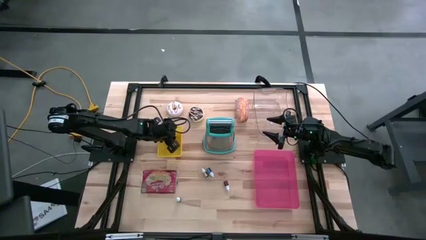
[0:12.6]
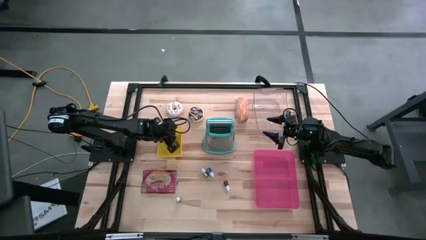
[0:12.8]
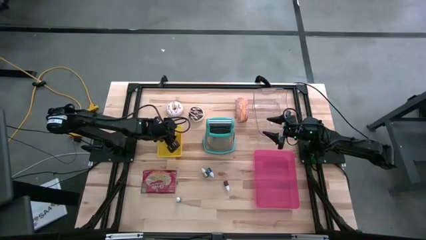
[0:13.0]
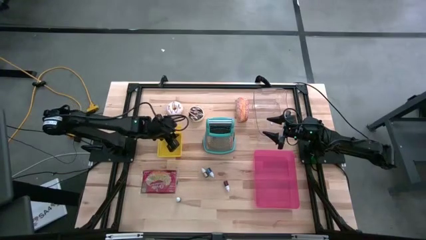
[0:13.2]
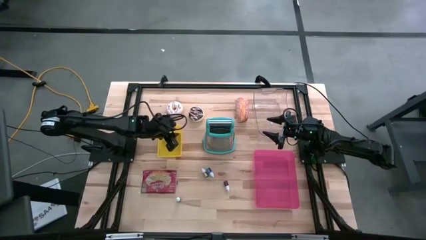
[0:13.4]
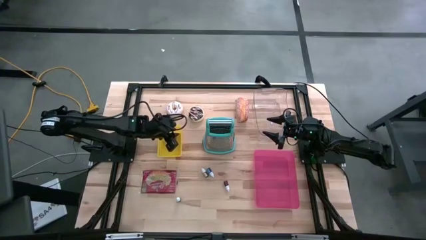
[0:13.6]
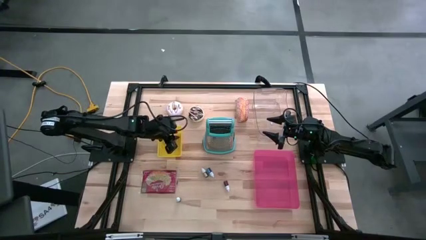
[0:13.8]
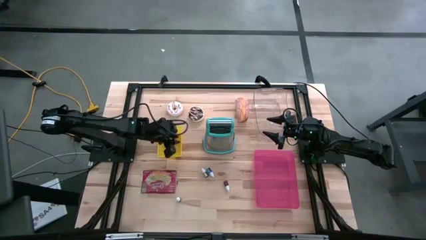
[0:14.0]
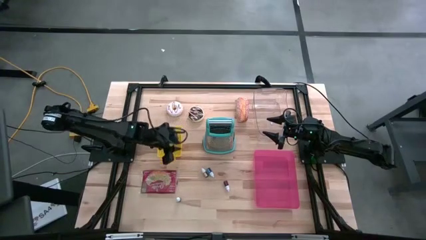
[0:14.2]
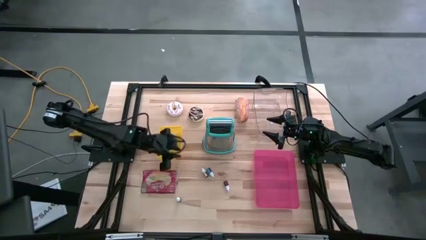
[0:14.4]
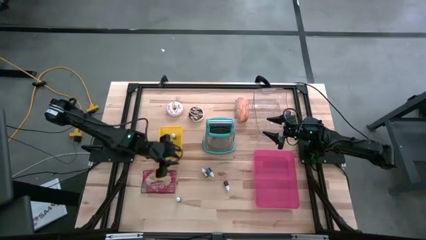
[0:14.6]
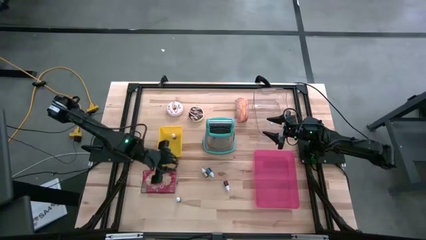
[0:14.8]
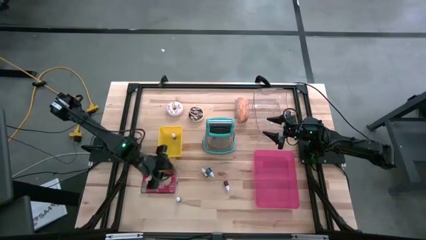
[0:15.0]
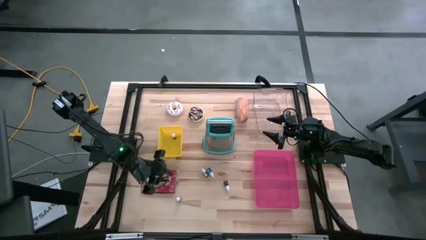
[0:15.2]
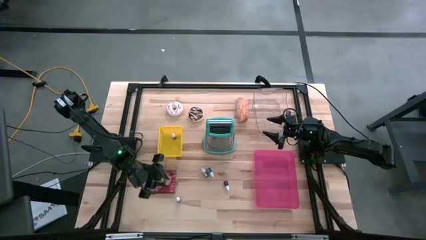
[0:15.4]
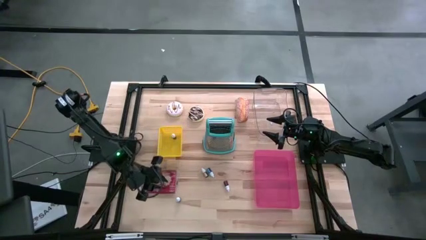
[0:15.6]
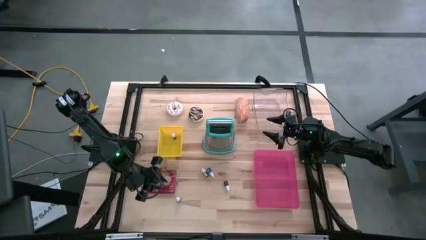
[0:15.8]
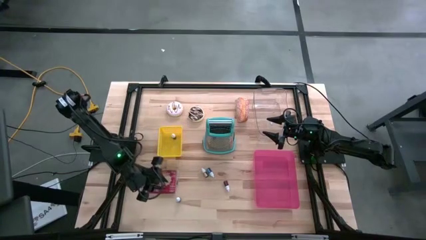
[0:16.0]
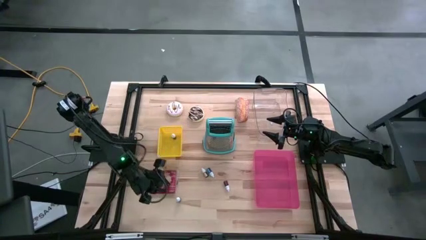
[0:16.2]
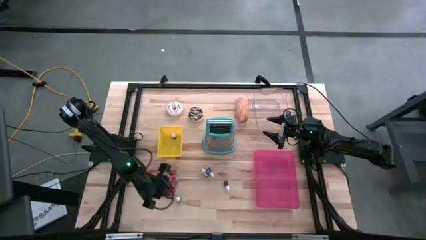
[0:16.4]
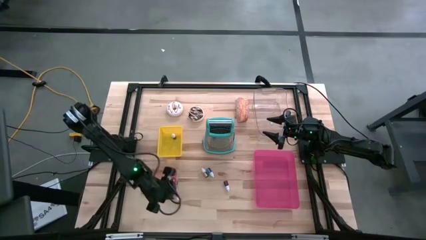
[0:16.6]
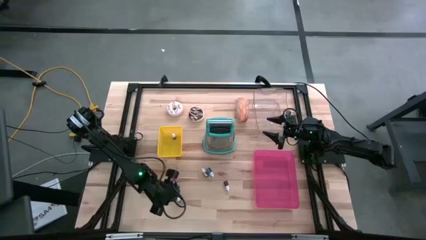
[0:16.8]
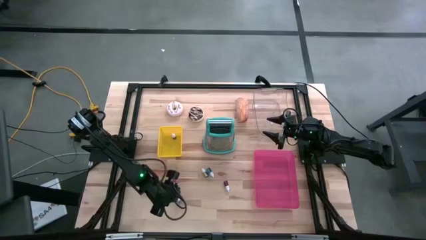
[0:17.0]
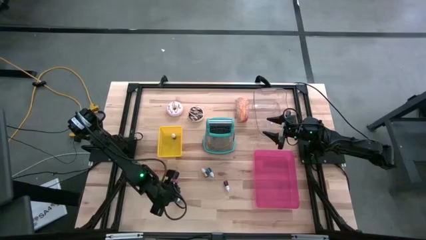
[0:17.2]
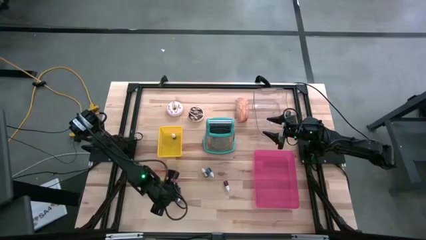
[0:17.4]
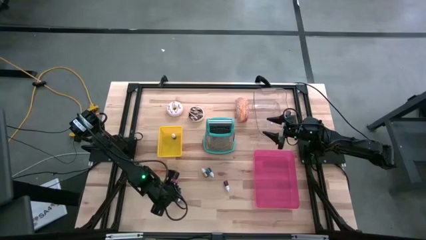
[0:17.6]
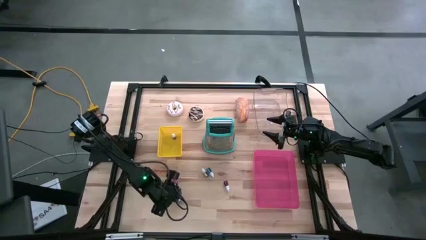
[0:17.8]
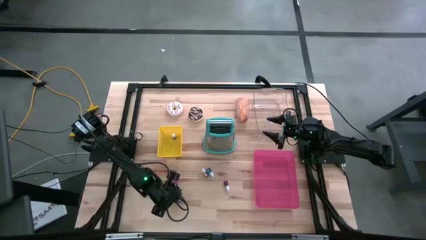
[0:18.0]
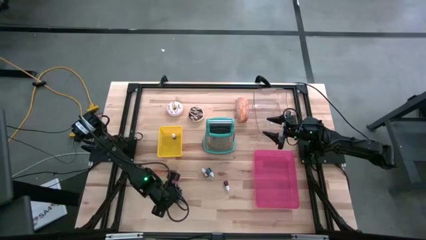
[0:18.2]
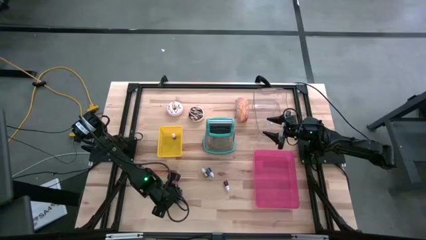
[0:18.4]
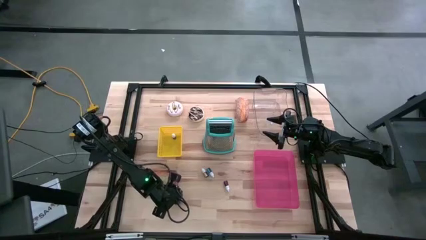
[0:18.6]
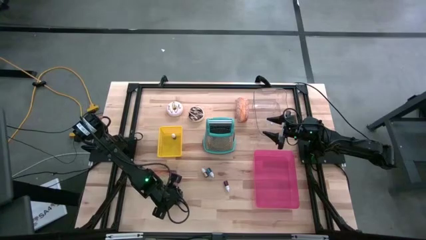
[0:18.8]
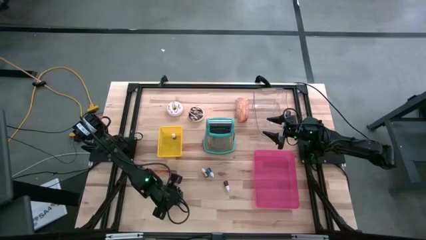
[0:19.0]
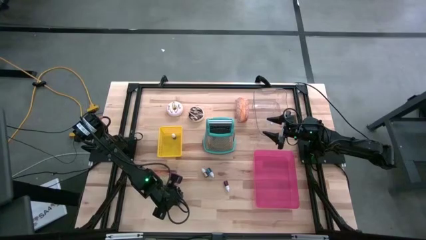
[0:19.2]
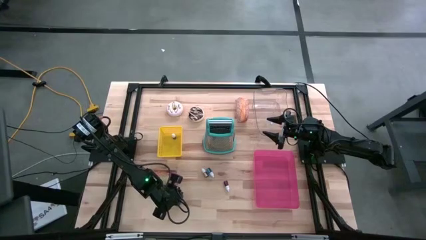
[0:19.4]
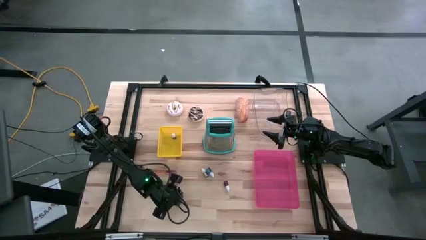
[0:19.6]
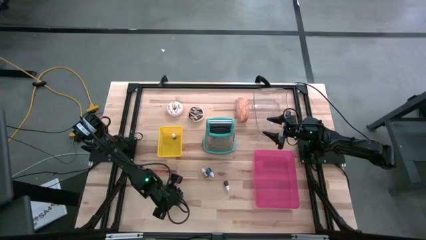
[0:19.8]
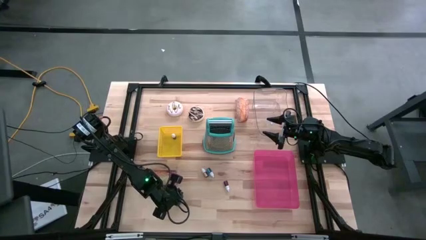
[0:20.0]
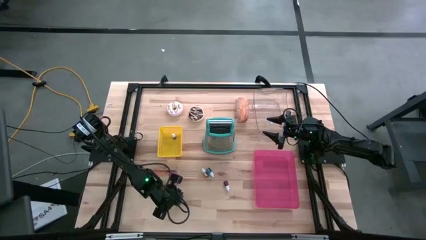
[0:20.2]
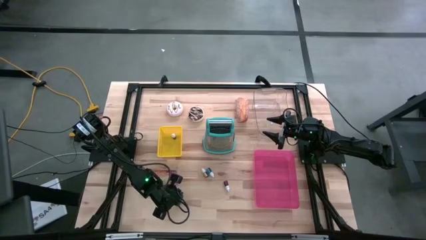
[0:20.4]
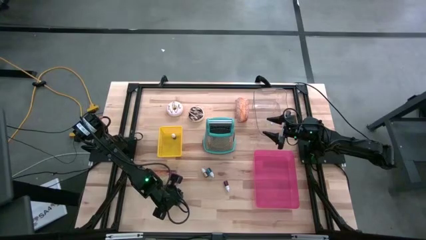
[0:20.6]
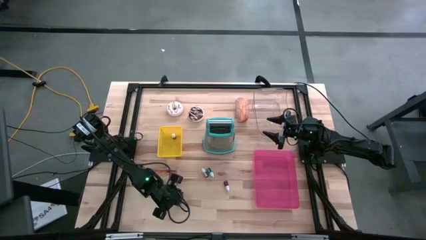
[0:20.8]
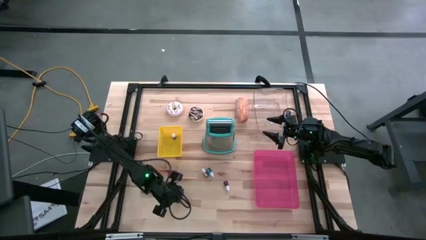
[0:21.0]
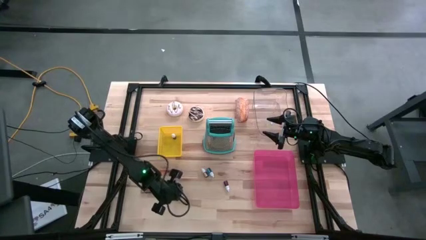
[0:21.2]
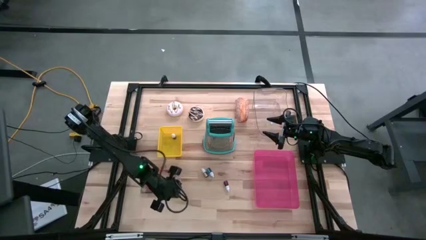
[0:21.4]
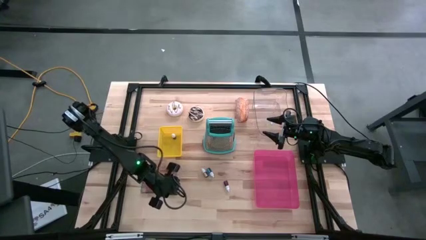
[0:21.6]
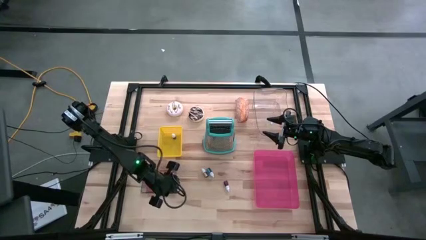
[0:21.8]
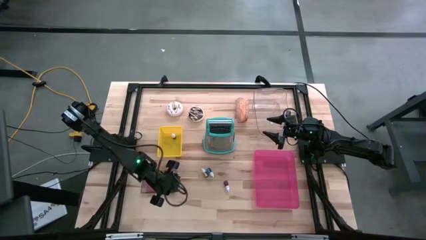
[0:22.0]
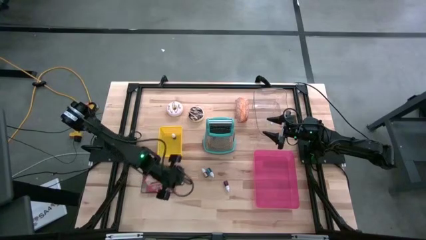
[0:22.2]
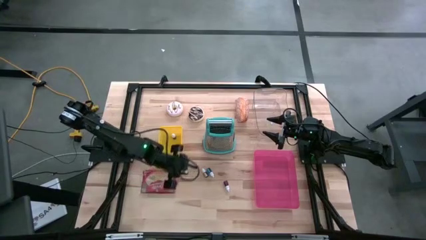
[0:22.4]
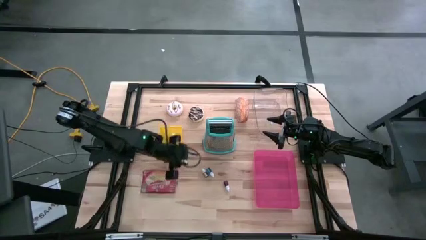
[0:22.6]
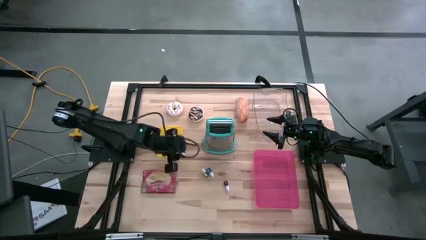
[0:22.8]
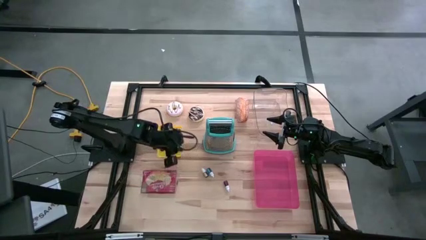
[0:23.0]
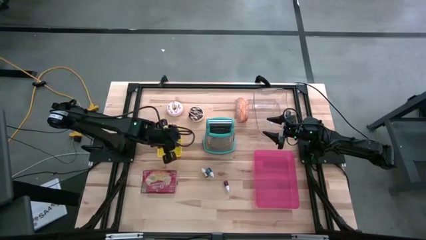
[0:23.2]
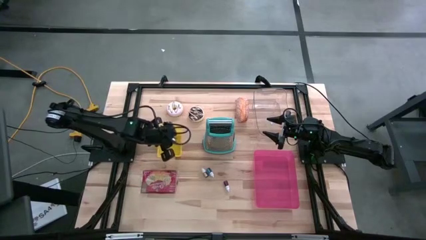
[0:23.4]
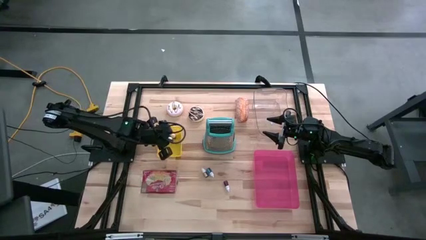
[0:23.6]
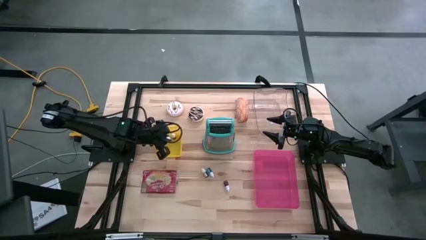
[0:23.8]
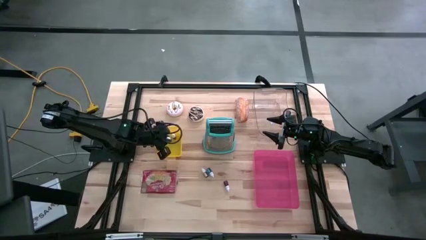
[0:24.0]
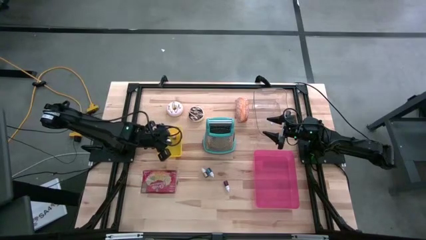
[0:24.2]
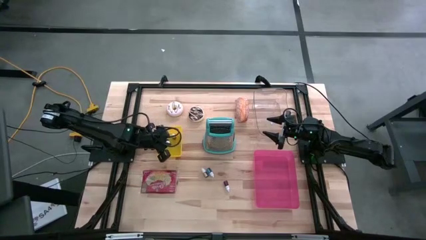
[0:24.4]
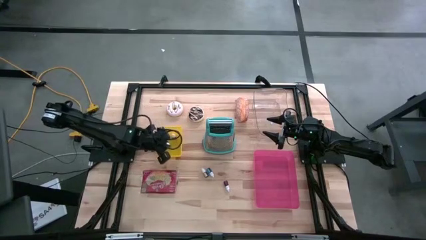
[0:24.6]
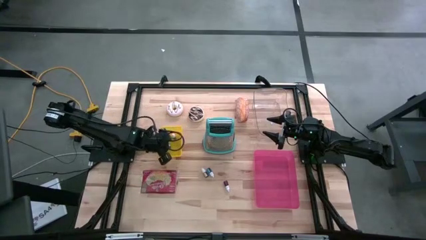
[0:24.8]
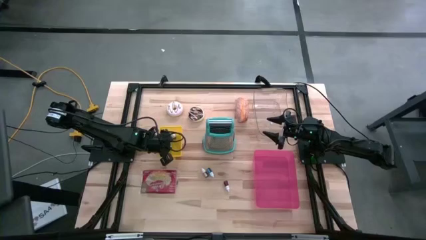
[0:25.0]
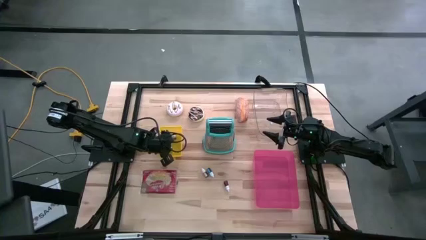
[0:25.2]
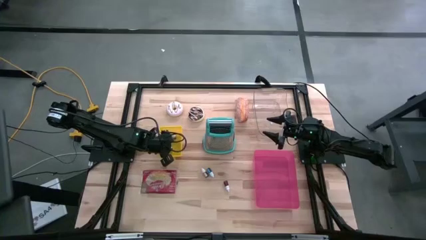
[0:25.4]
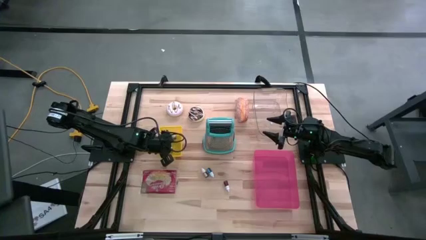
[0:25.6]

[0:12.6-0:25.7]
Put the black food coloring bottle into the yellow bin
